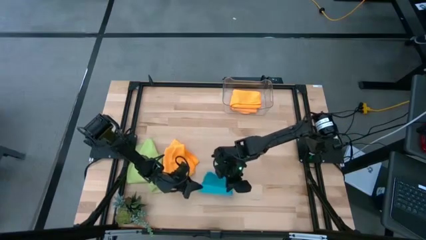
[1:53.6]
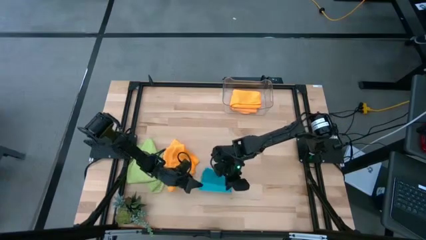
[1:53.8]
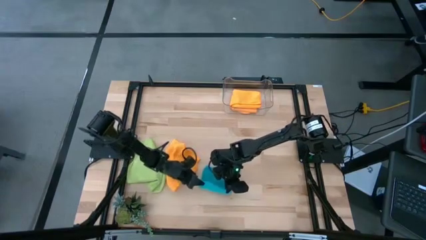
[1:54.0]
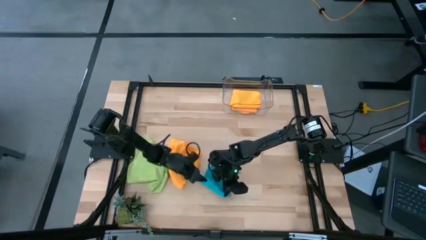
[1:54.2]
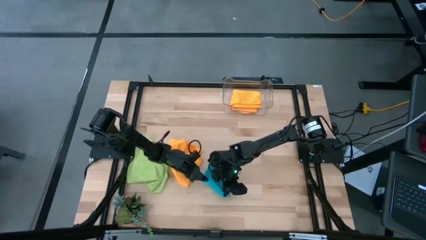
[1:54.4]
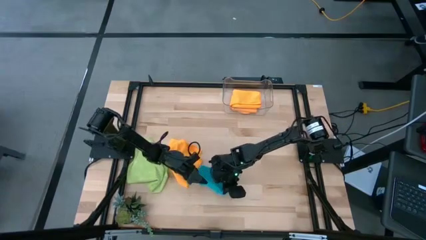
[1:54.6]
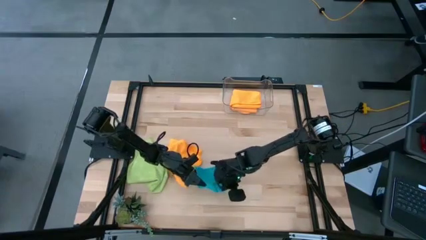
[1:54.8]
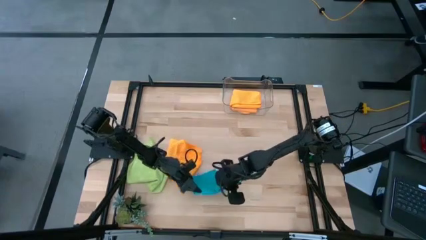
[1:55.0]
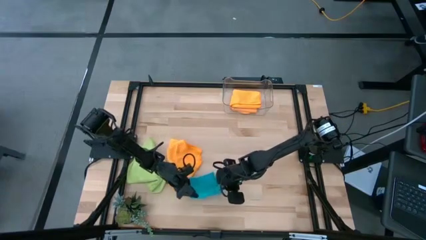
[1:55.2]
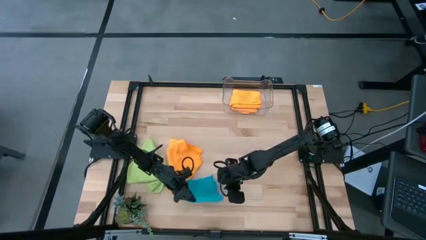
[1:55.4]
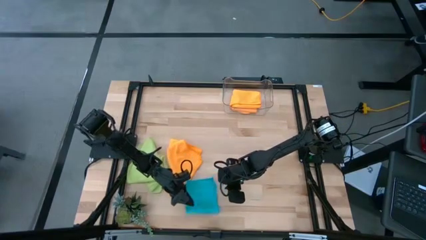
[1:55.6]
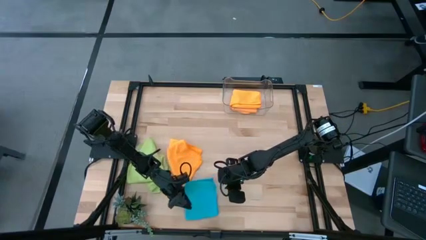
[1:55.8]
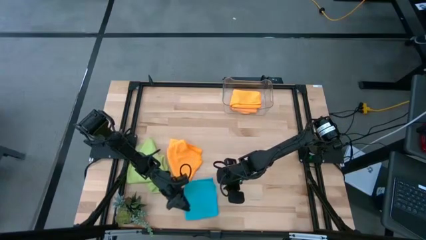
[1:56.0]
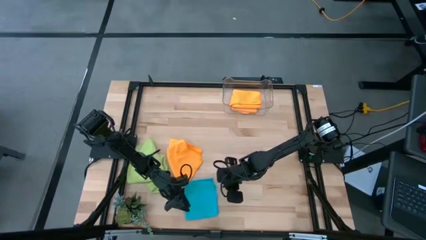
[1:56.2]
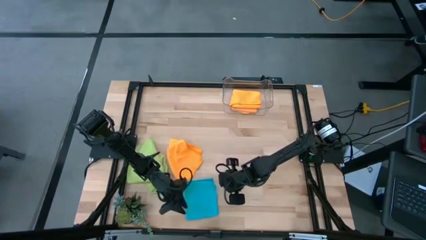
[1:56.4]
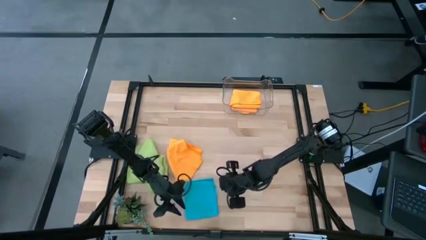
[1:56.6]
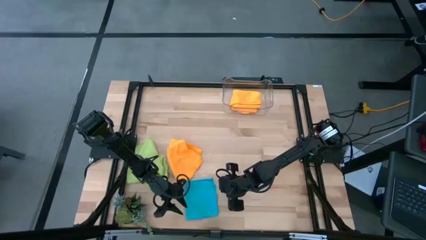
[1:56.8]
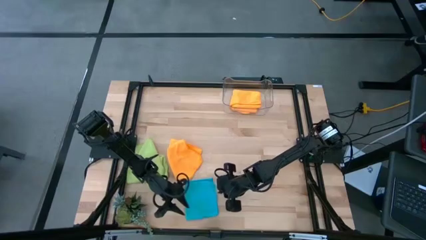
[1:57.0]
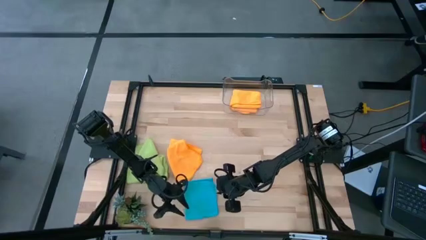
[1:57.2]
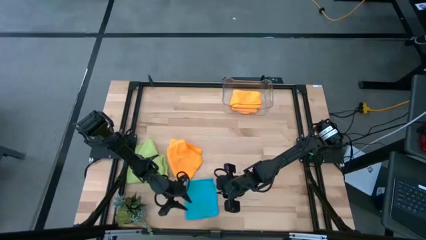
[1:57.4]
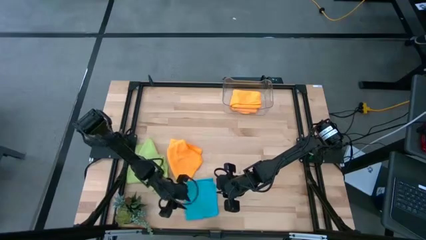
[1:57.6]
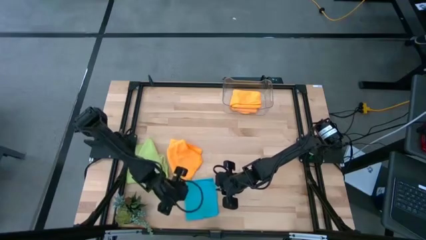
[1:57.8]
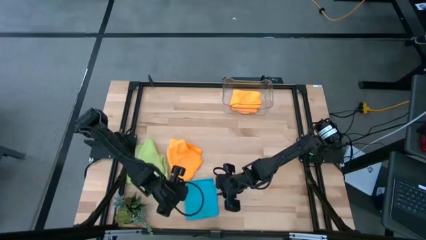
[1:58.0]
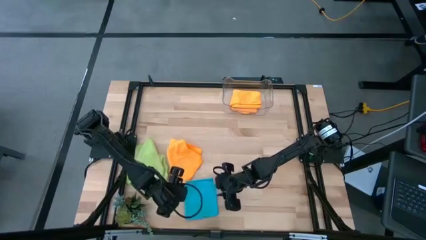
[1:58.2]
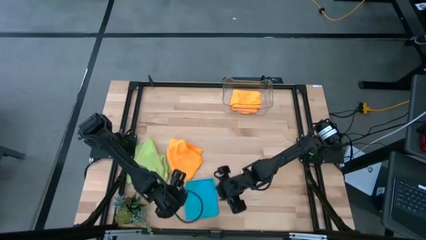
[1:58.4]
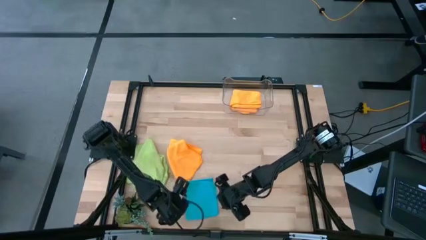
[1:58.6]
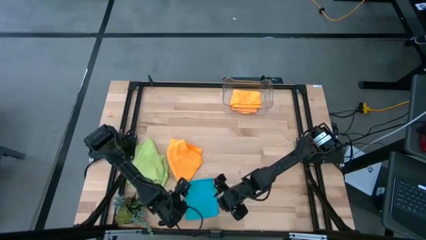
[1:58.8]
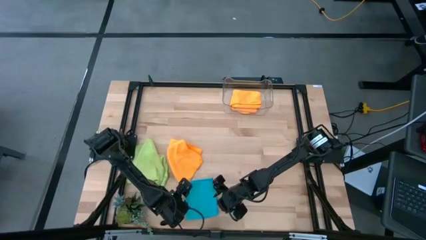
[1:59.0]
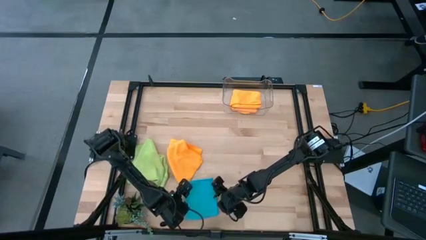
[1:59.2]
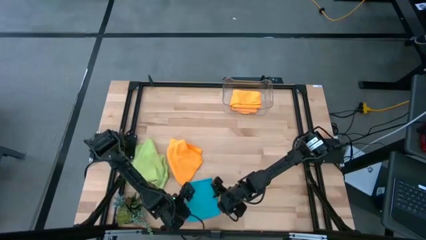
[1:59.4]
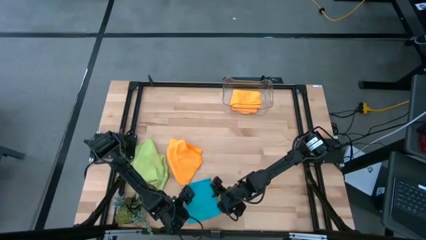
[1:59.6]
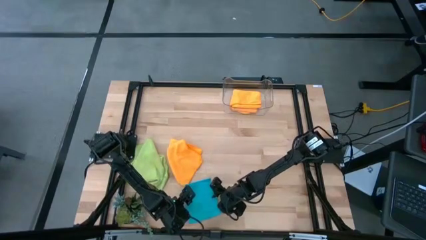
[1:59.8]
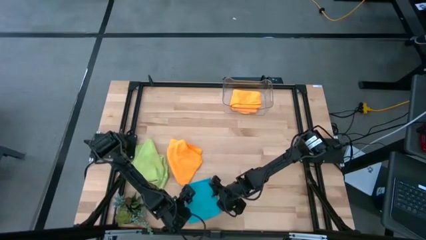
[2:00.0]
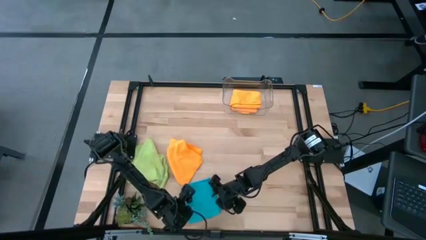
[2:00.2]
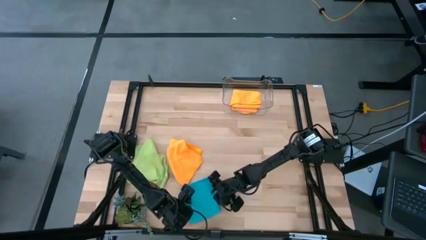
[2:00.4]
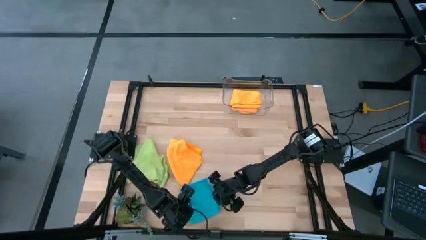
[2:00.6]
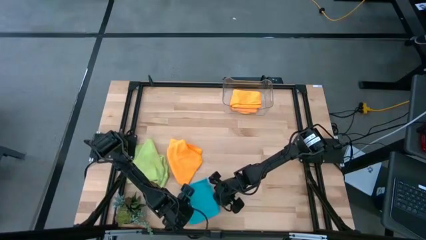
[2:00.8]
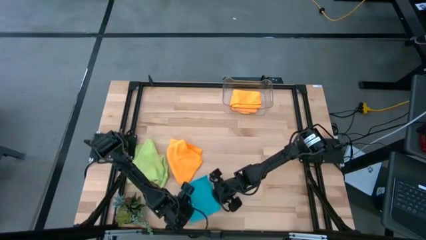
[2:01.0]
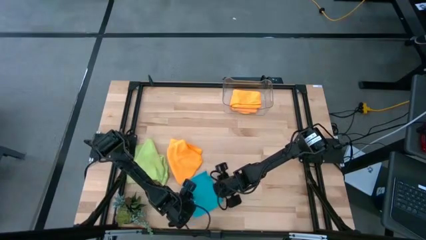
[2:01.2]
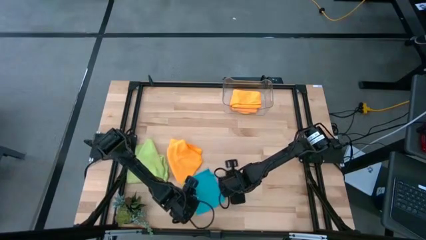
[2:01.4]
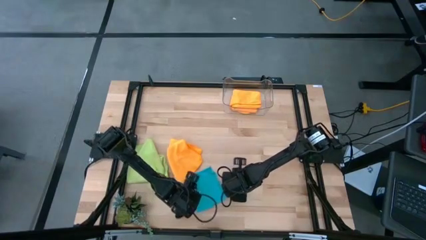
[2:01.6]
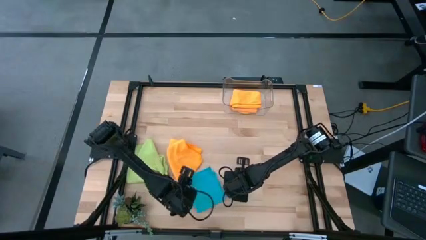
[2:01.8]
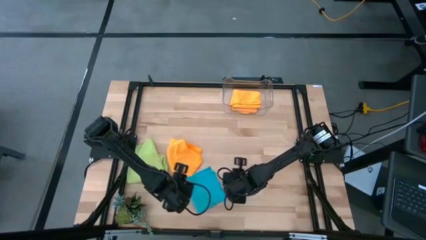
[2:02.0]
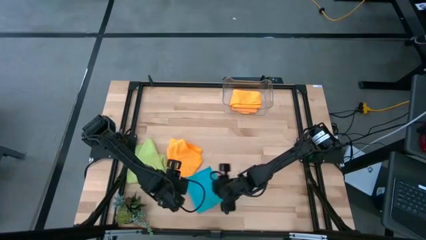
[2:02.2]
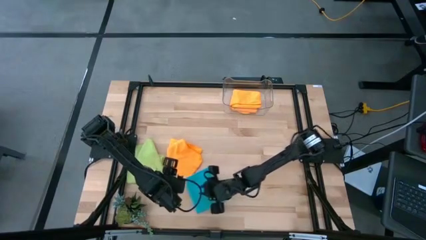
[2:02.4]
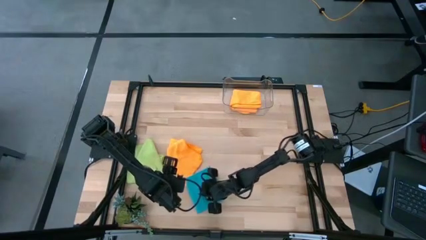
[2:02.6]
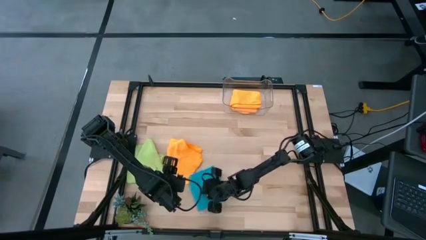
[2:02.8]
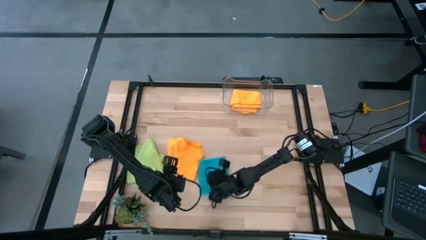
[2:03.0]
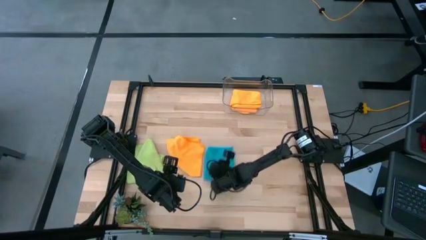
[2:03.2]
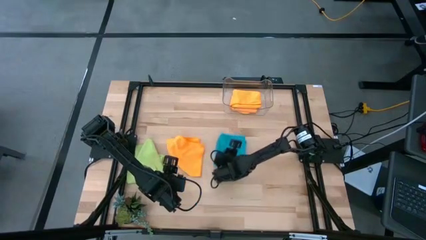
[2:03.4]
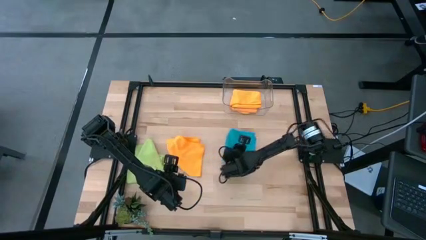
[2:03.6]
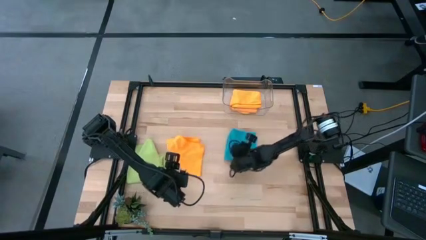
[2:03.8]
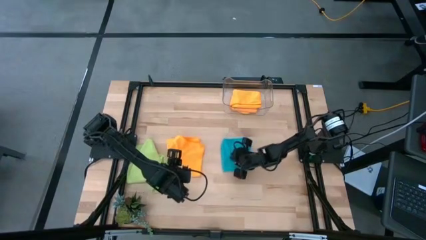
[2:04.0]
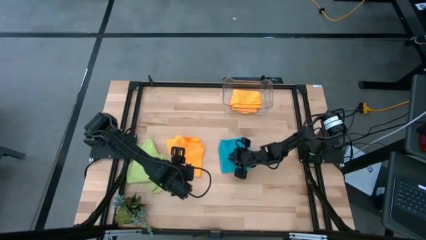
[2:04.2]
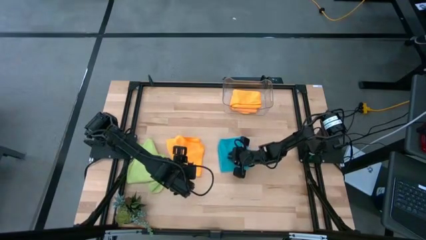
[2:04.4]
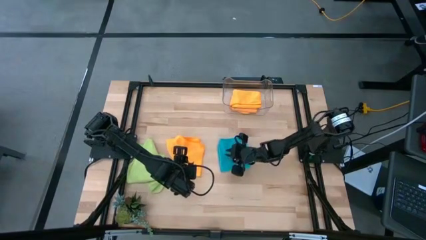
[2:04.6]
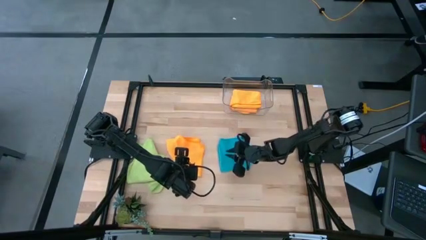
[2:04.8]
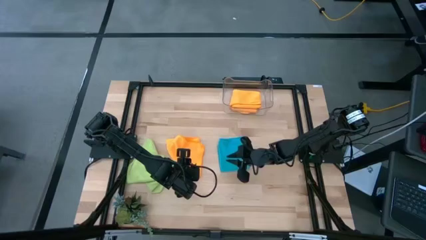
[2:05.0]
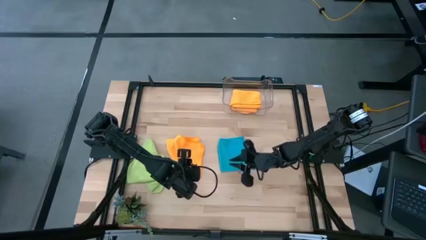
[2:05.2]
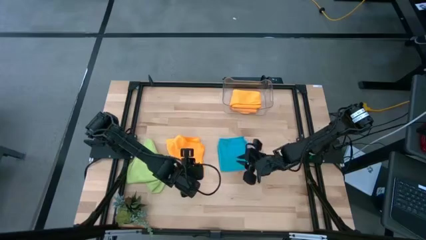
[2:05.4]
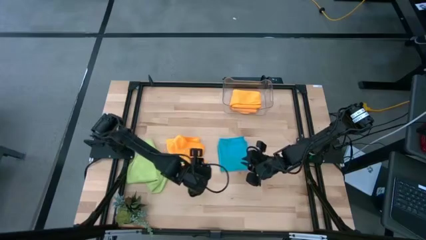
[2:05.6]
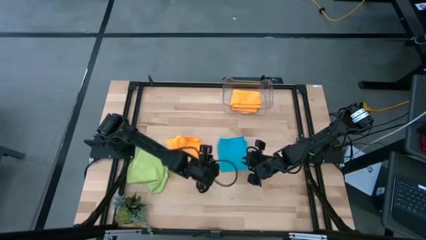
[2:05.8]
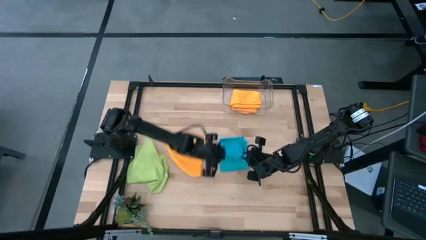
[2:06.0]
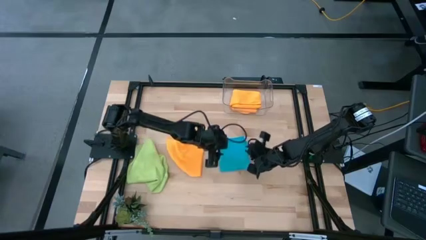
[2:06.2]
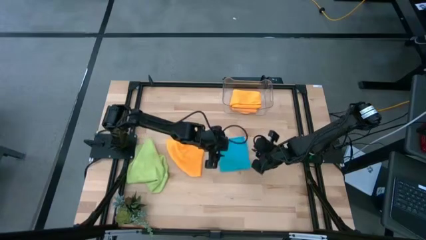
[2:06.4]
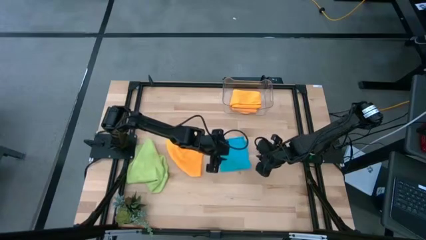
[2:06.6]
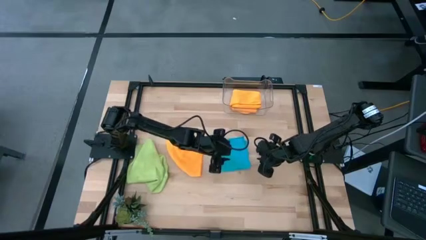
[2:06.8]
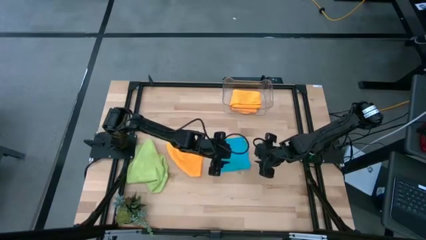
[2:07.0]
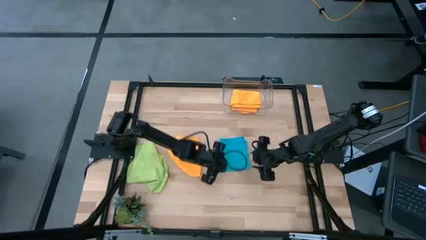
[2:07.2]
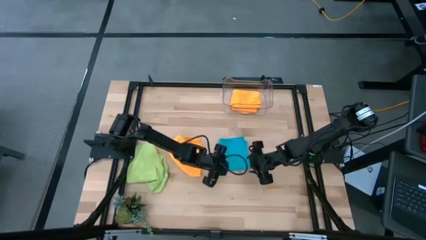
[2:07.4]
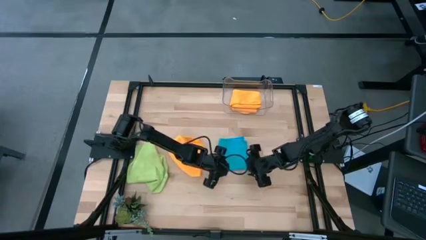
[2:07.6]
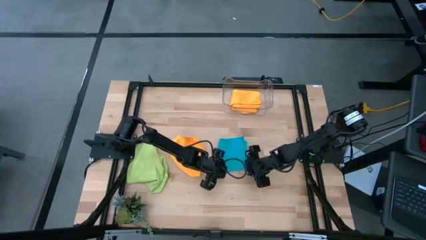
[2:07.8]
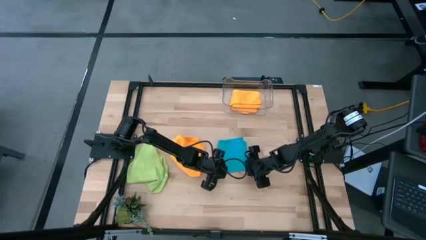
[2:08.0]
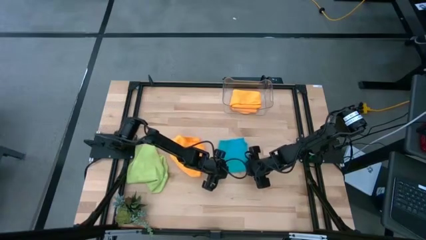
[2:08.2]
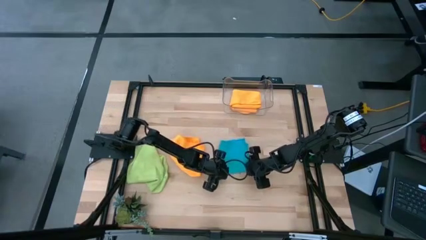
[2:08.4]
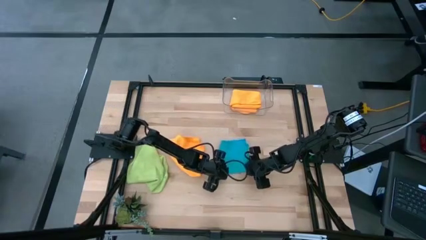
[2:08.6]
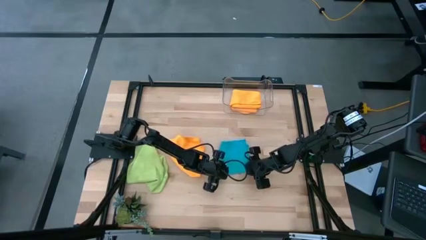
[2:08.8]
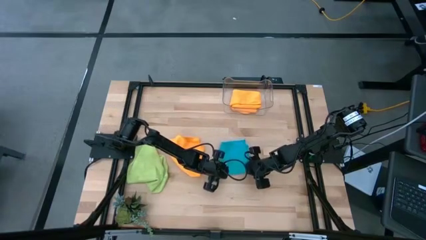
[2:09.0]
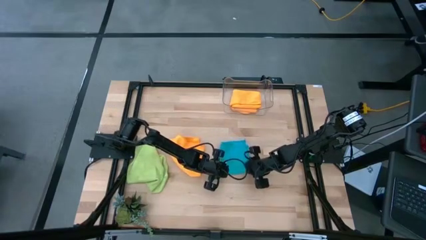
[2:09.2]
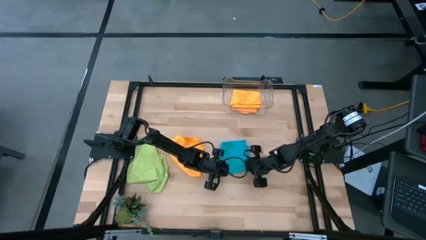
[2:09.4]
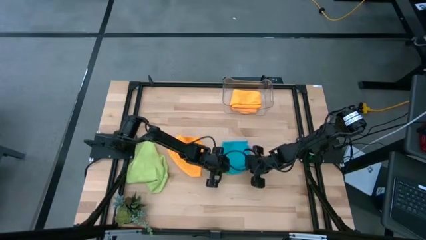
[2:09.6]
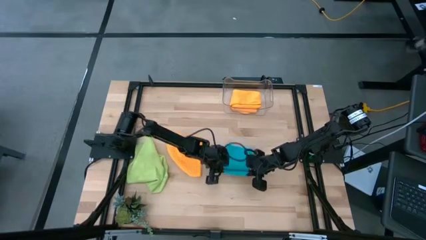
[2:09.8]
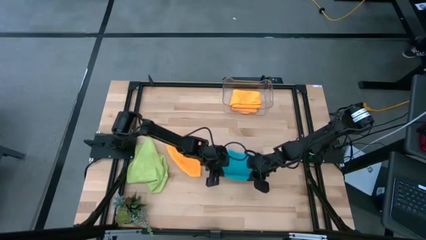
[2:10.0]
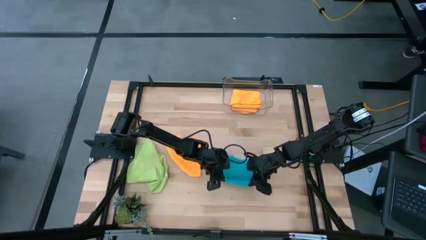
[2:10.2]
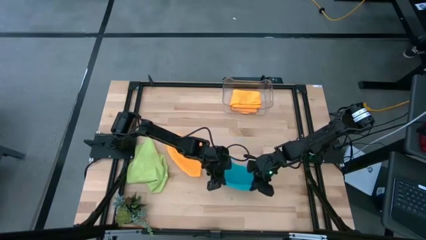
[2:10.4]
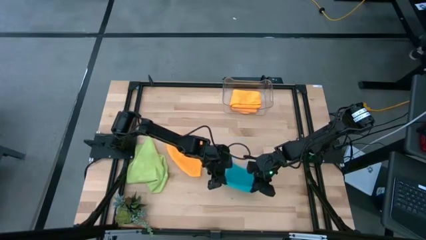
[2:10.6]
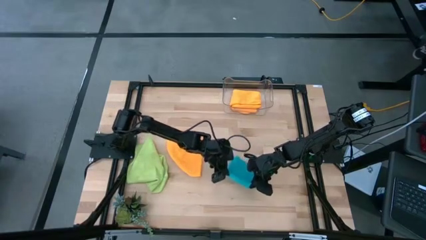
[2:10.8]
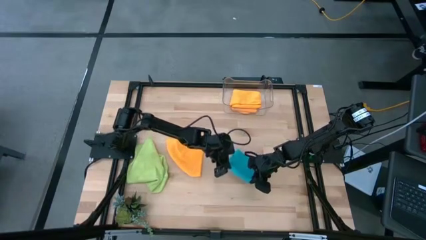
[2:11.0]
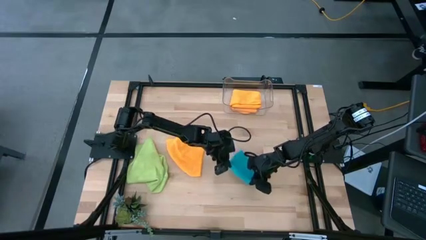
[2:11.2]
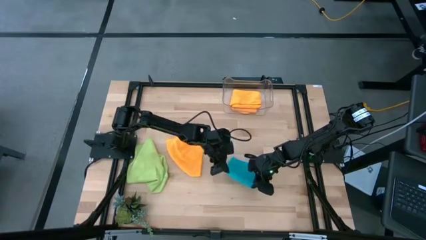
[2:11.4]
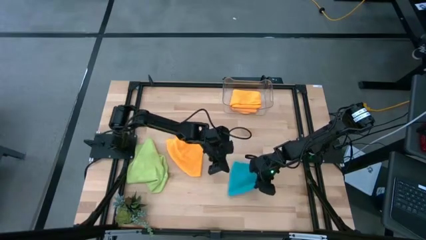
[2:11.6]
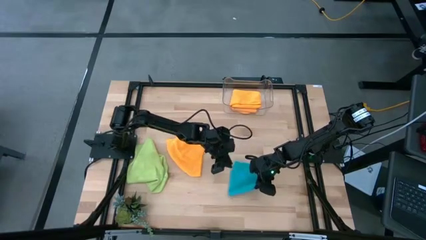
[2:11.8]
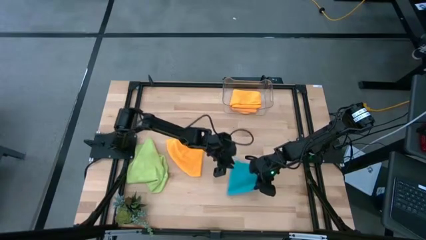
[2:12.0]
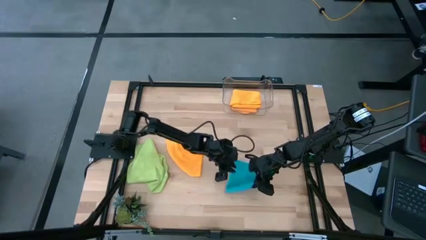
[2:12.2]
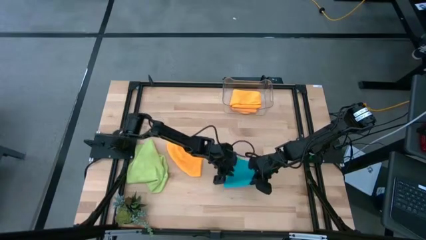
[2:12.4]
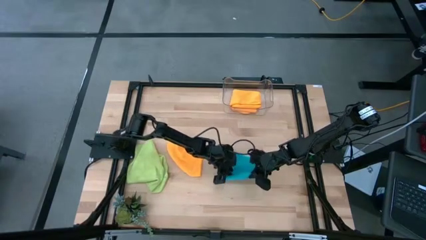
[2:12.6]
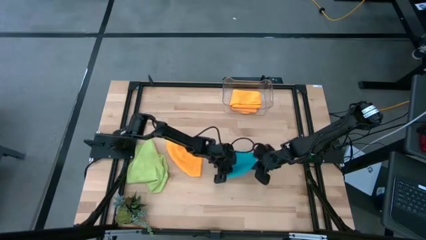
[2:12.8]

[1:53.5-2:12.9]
Task: Fold microfiber towels
Fold the blue microfiber towel
